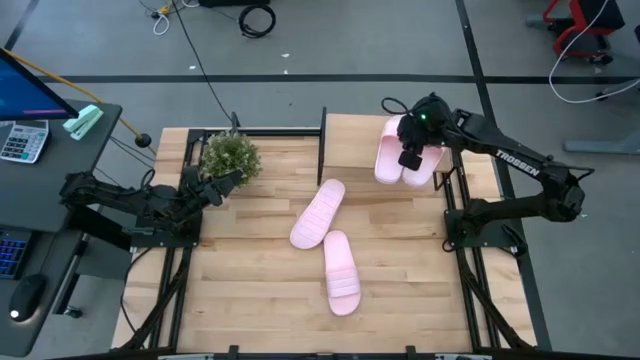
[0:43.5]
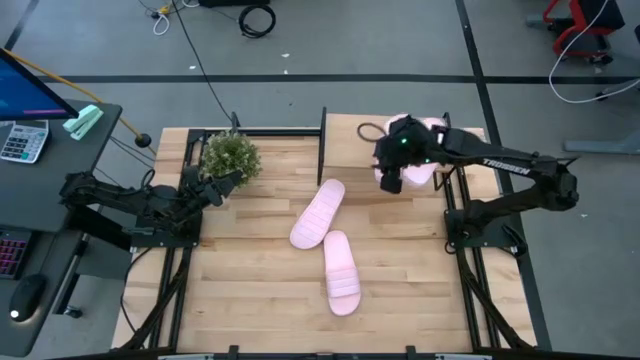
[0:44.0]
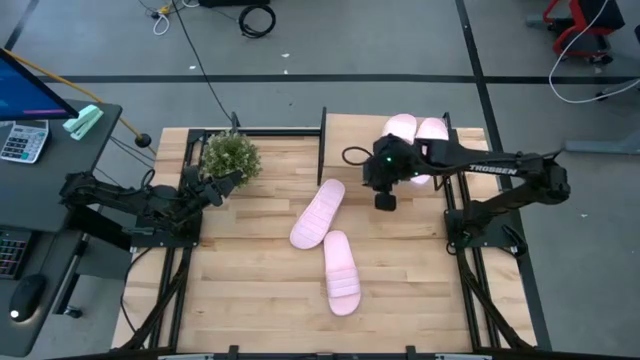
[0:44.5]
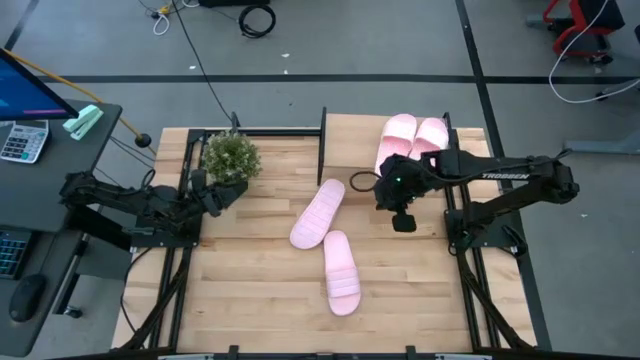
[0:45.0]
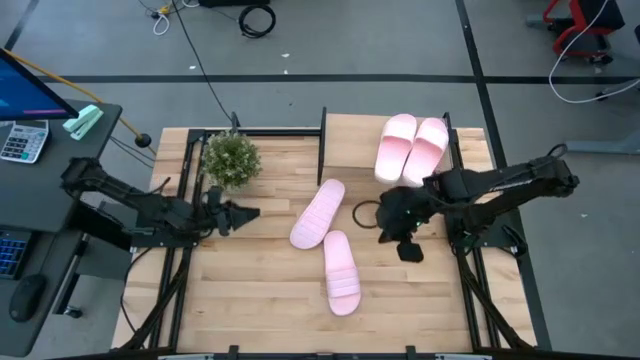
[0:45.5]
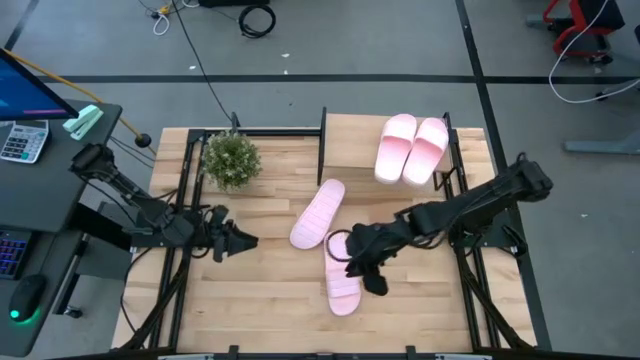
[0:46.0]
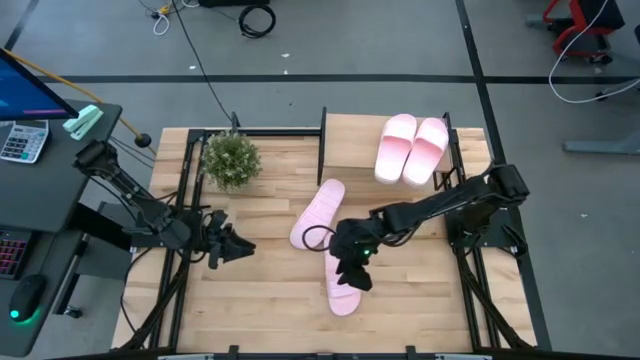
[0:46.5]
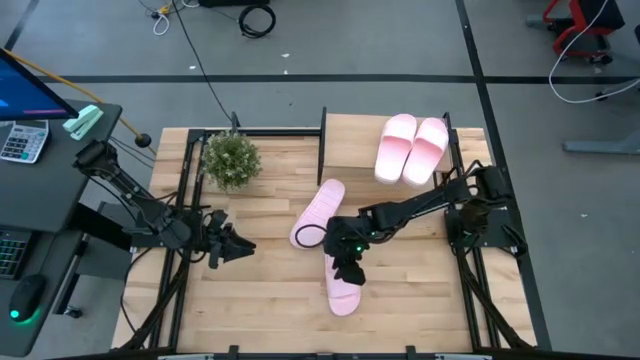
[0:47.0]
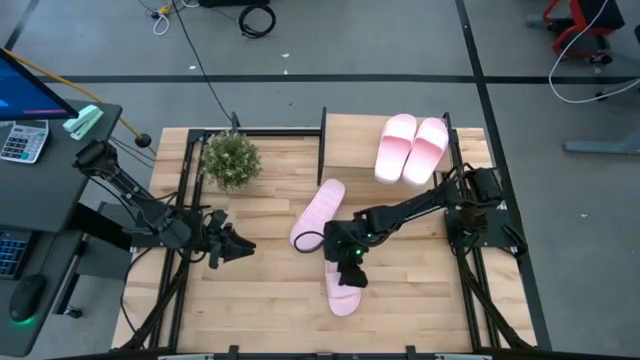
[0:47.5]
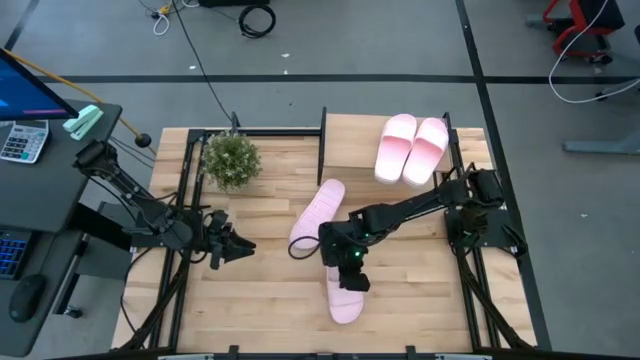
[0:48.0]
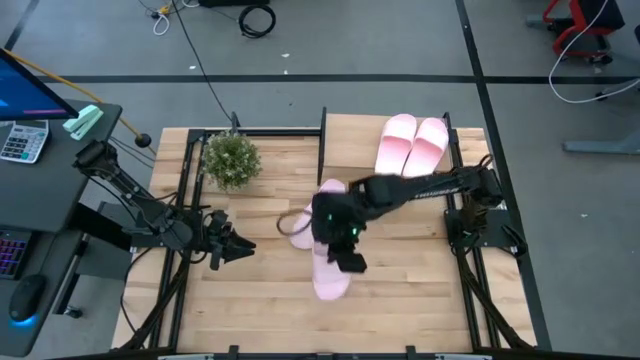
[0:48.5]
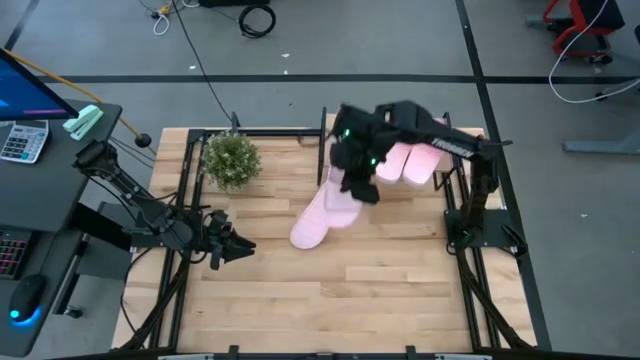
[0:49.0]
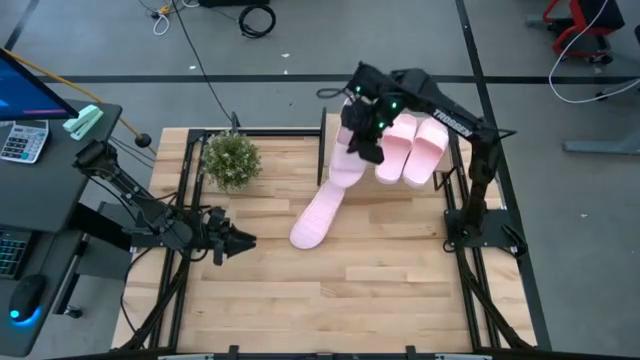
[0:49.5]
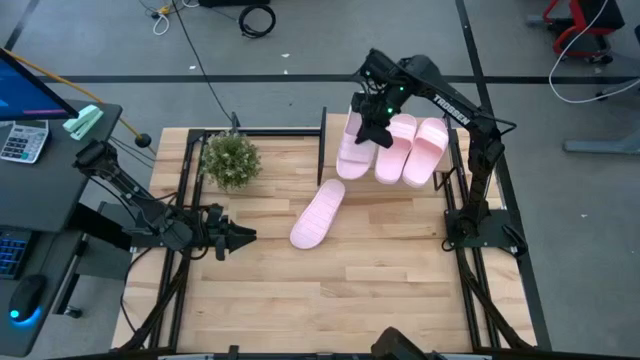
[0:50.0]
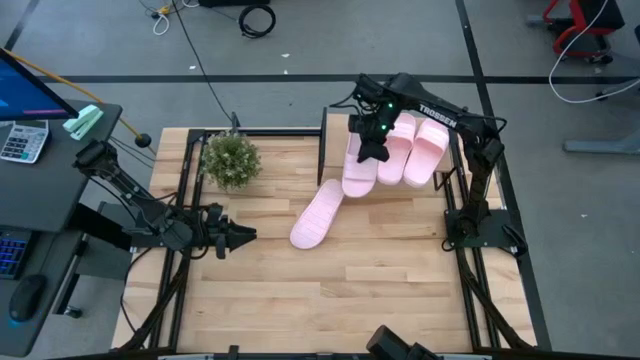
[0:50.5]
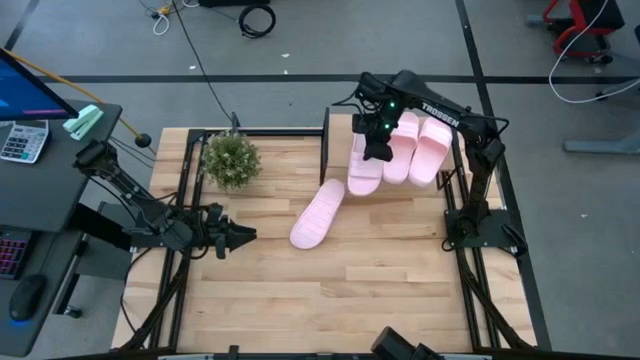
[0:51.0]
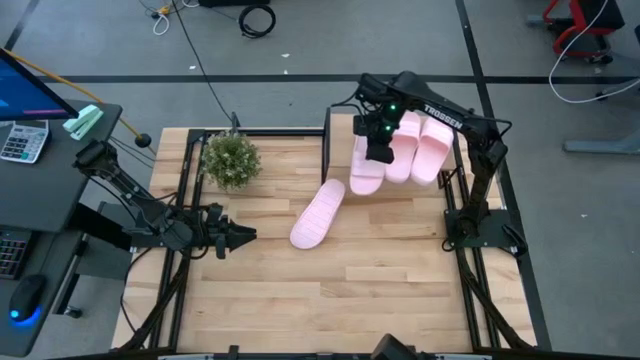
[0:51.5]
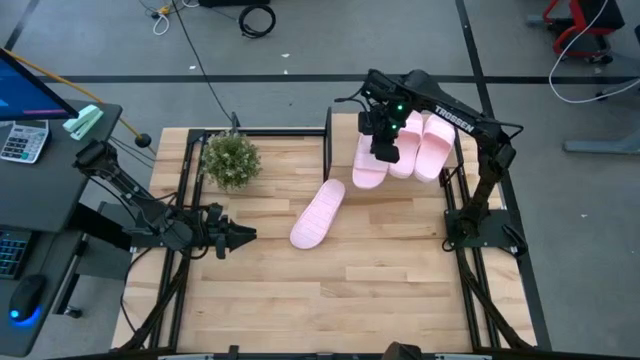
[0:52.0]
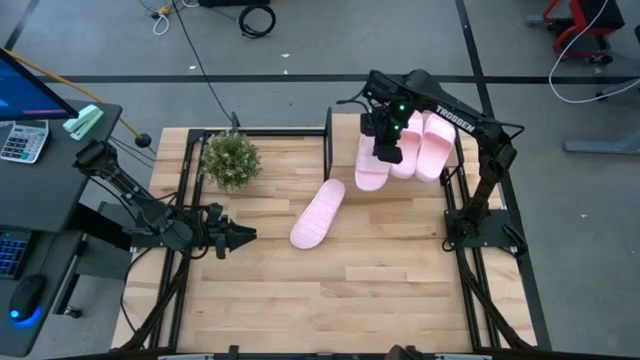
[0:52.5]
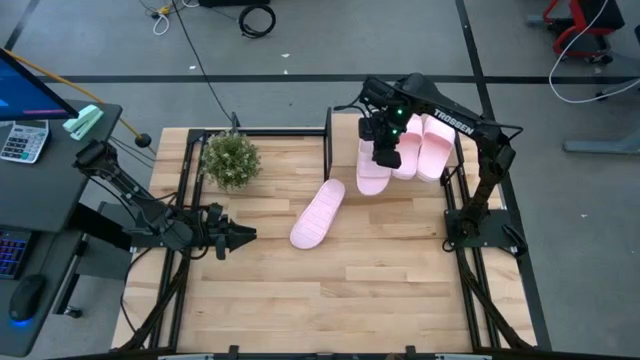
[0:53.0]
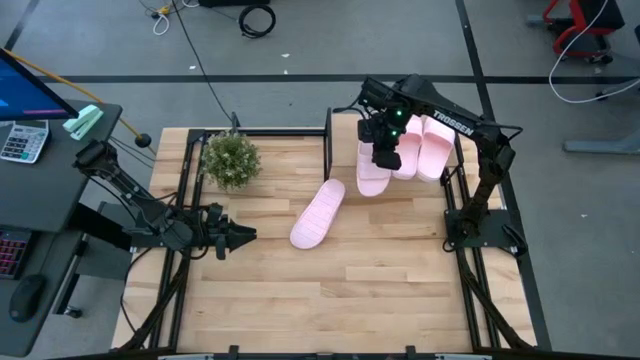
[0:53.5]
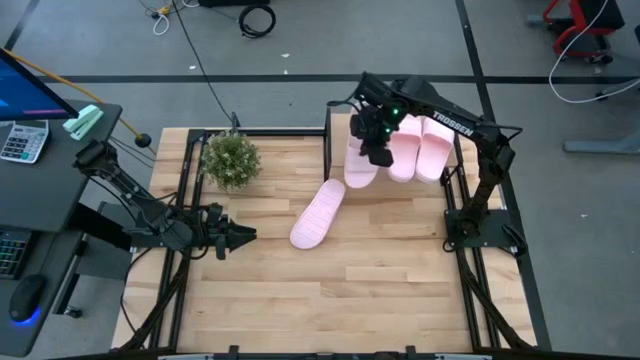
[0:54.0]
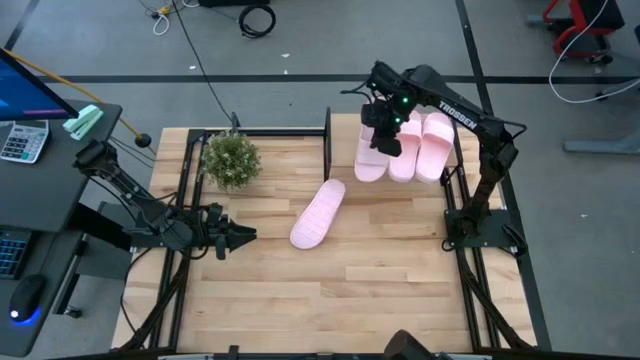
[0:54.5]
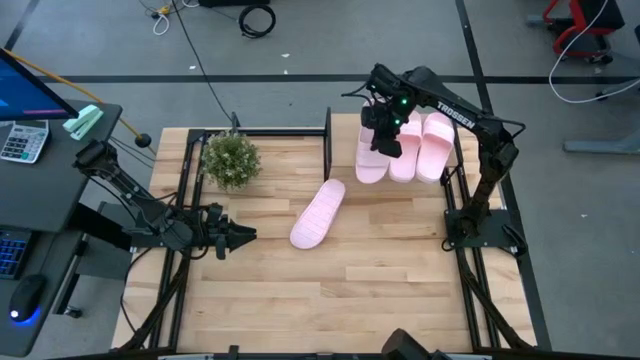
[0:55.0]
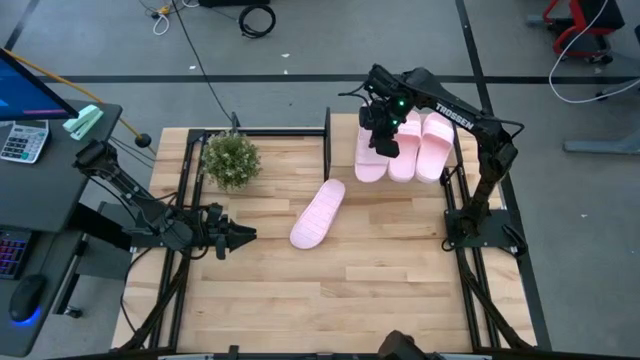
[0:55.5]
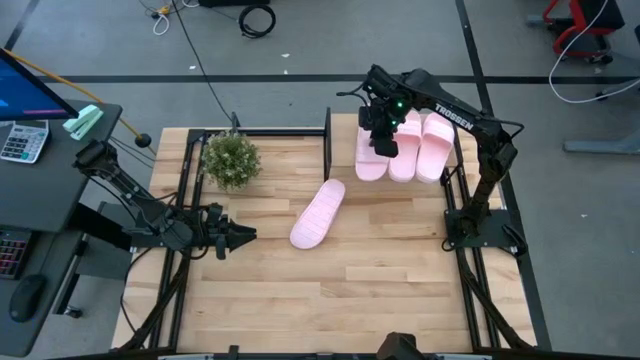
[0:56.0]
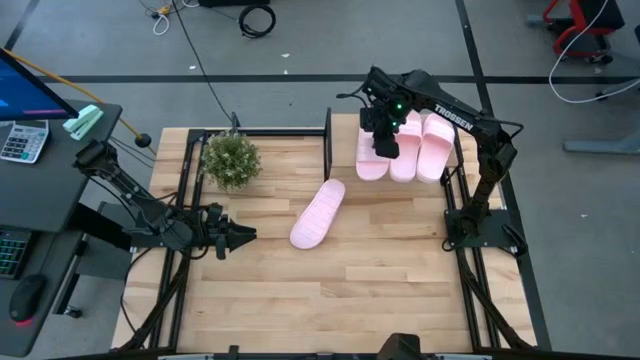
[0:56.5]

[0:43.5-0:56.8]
Task: Pick and place slides into the shelf
Put the bottom pink slide on the shelf
